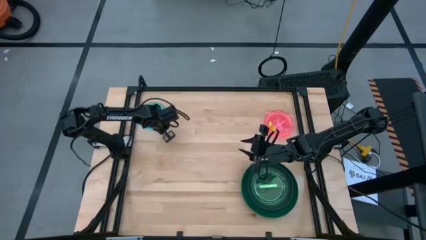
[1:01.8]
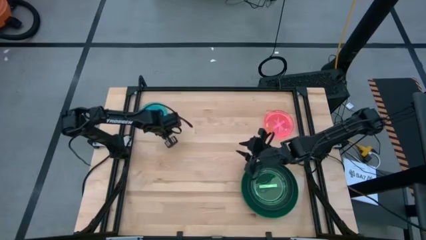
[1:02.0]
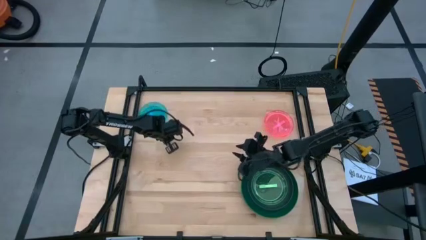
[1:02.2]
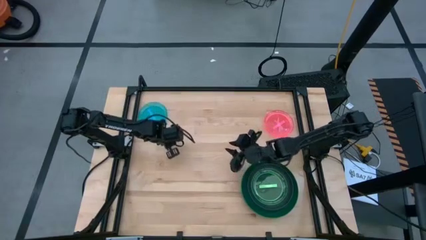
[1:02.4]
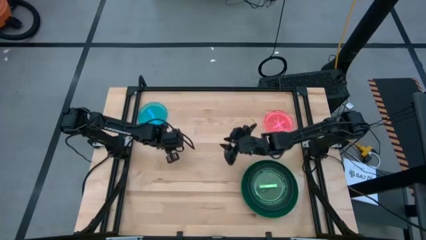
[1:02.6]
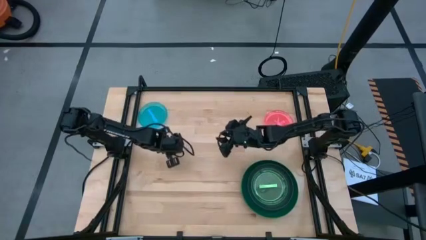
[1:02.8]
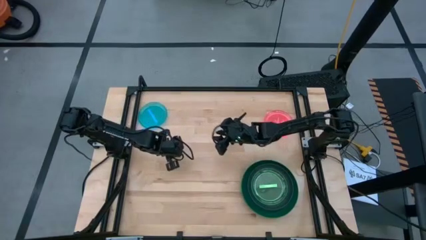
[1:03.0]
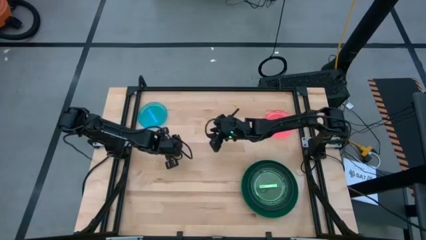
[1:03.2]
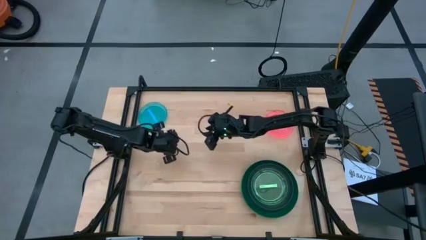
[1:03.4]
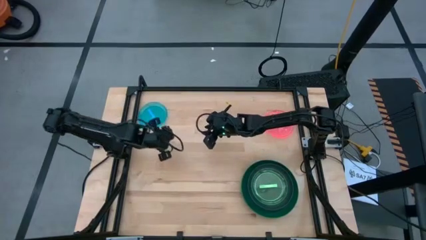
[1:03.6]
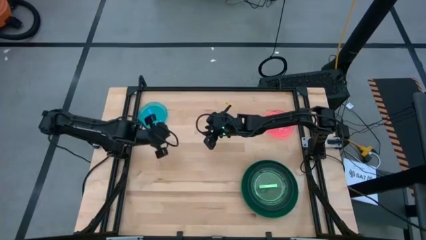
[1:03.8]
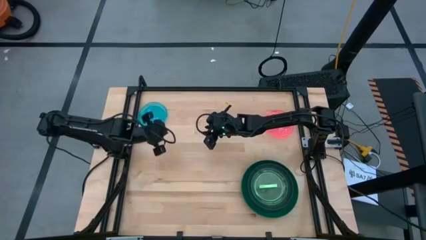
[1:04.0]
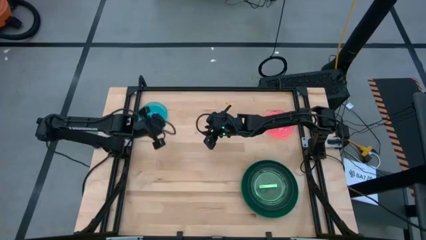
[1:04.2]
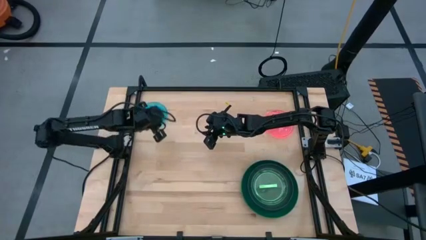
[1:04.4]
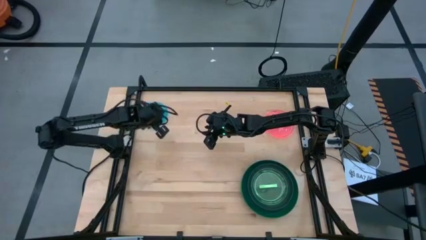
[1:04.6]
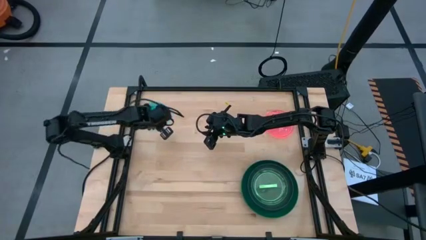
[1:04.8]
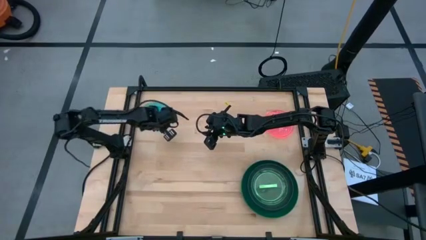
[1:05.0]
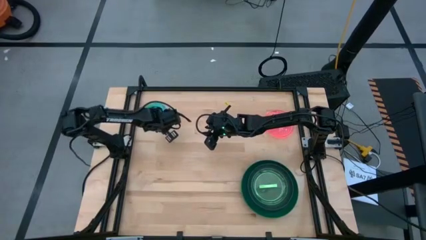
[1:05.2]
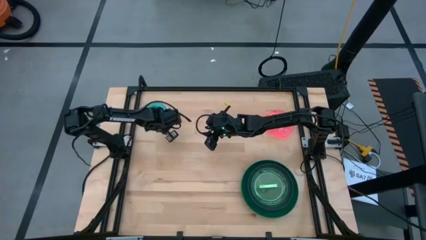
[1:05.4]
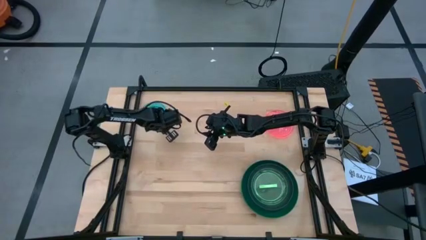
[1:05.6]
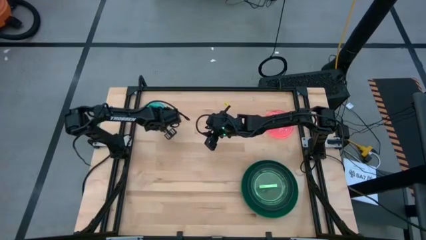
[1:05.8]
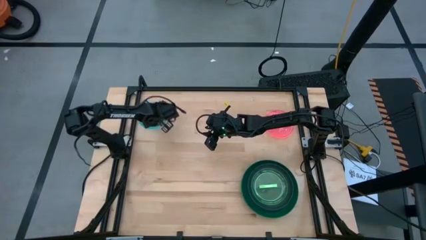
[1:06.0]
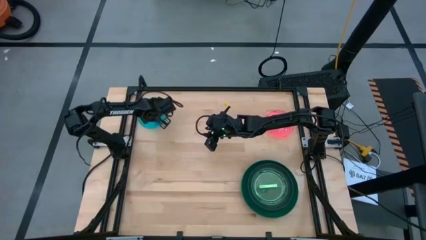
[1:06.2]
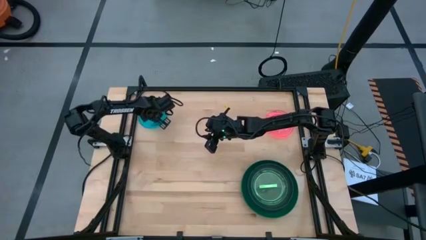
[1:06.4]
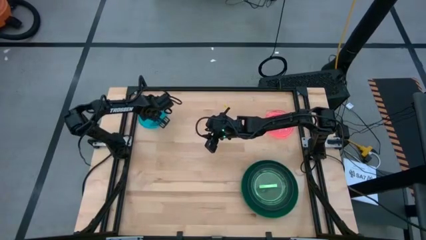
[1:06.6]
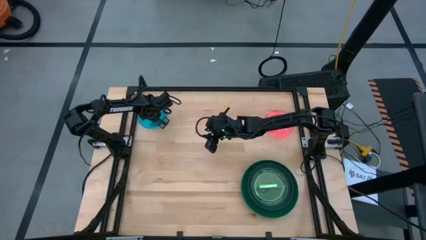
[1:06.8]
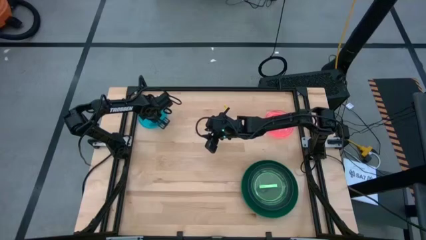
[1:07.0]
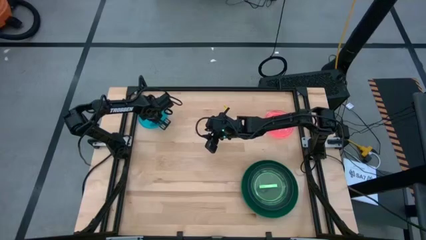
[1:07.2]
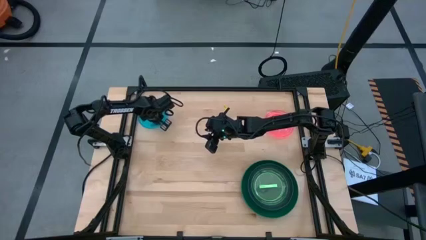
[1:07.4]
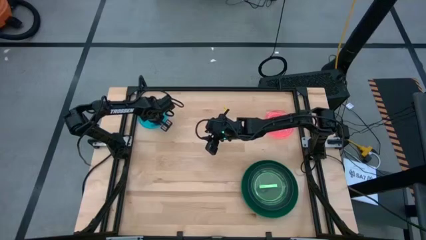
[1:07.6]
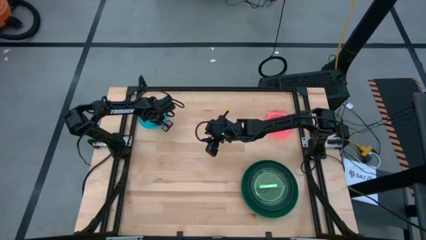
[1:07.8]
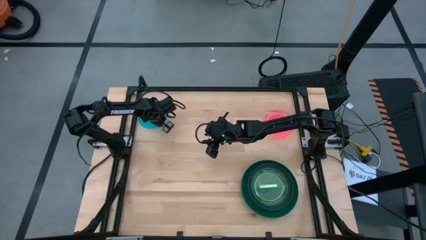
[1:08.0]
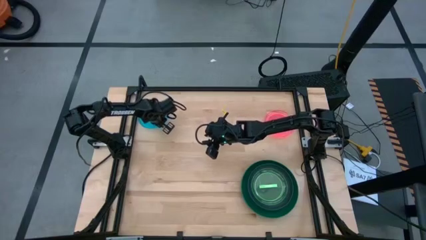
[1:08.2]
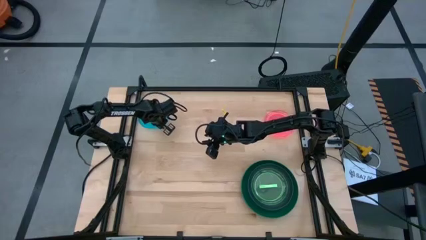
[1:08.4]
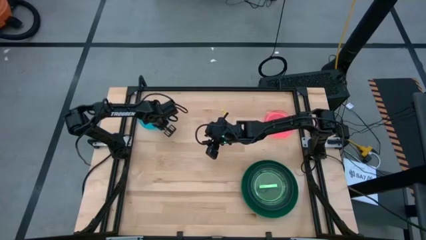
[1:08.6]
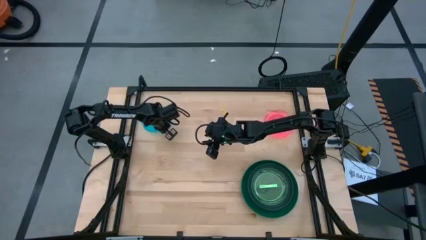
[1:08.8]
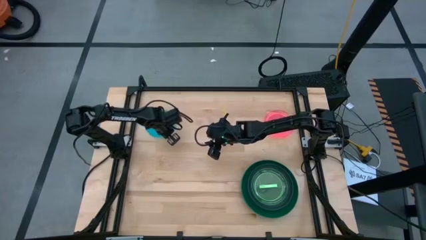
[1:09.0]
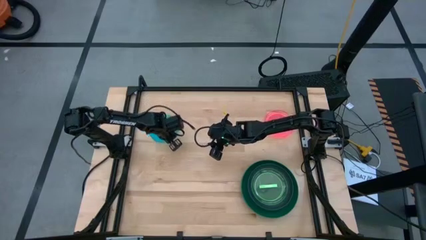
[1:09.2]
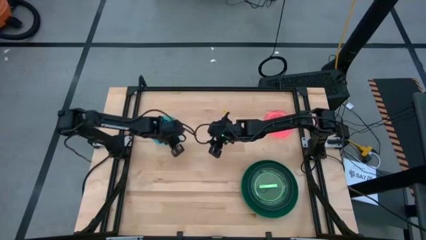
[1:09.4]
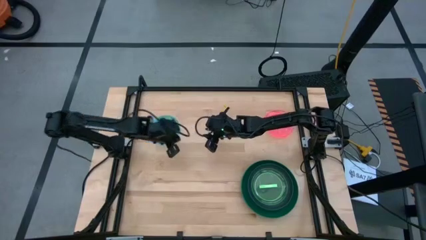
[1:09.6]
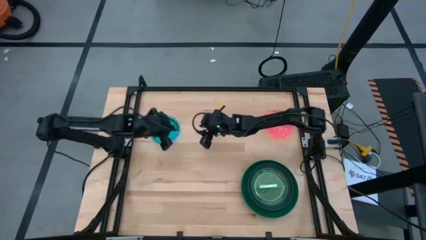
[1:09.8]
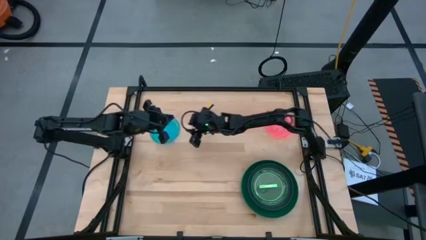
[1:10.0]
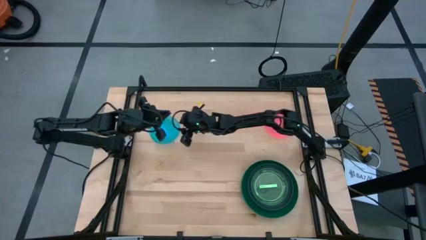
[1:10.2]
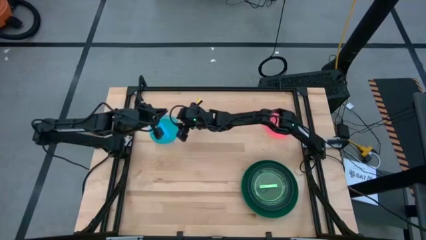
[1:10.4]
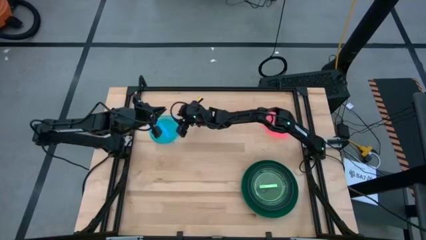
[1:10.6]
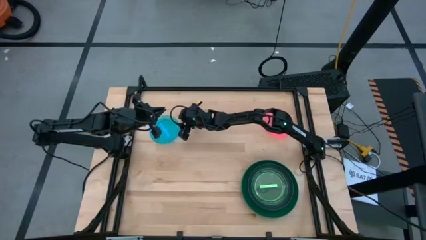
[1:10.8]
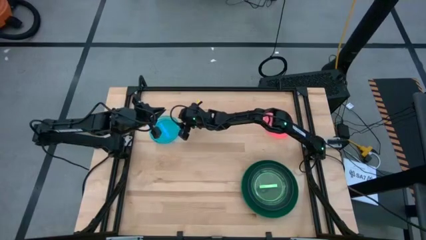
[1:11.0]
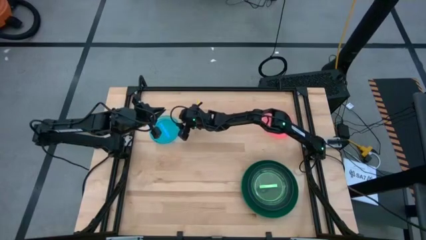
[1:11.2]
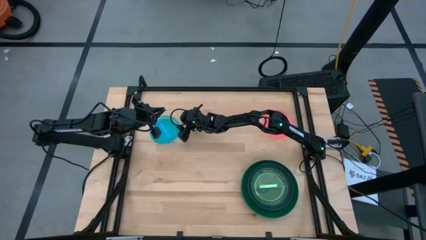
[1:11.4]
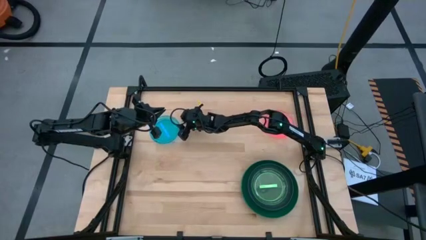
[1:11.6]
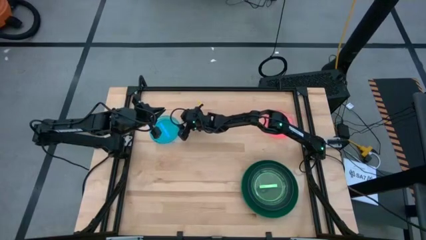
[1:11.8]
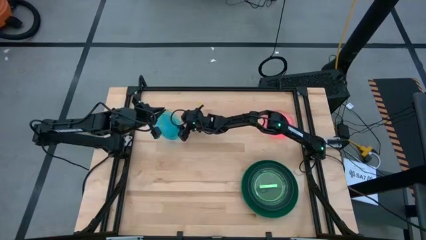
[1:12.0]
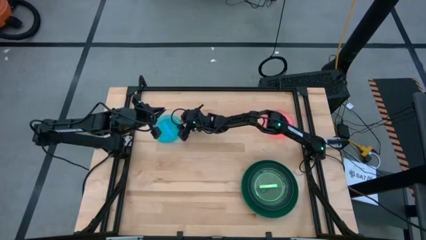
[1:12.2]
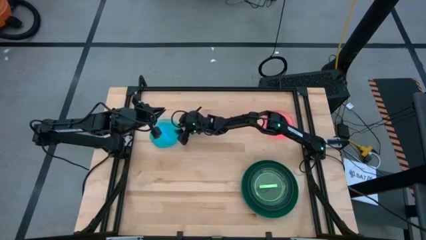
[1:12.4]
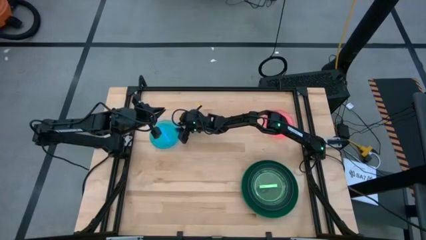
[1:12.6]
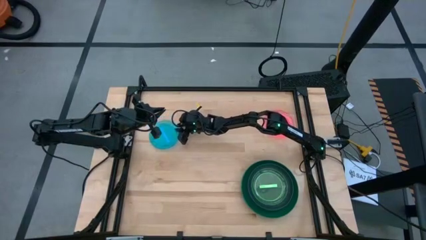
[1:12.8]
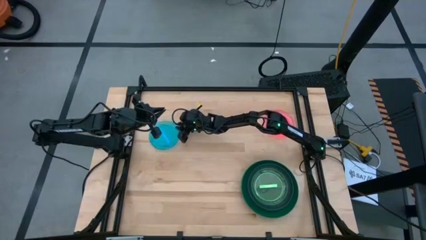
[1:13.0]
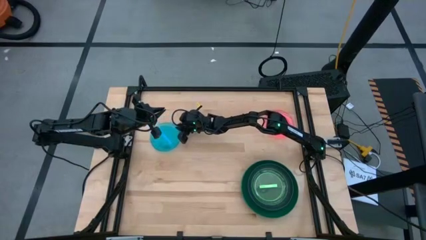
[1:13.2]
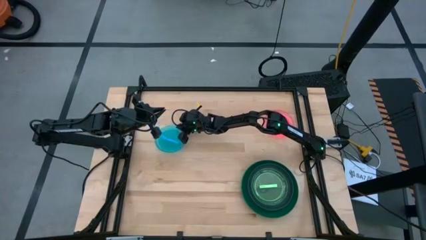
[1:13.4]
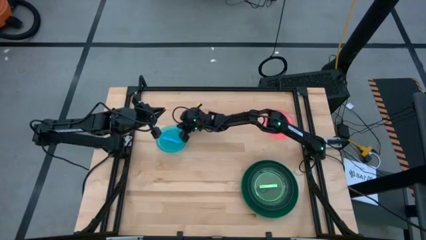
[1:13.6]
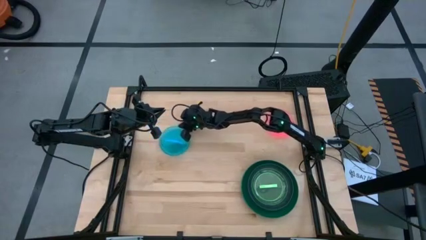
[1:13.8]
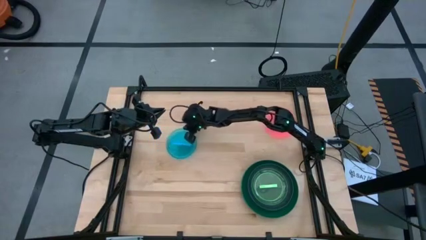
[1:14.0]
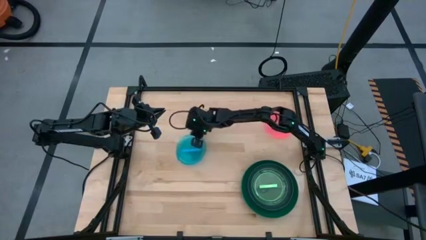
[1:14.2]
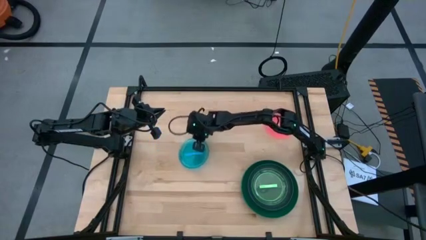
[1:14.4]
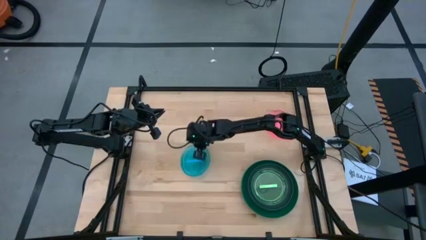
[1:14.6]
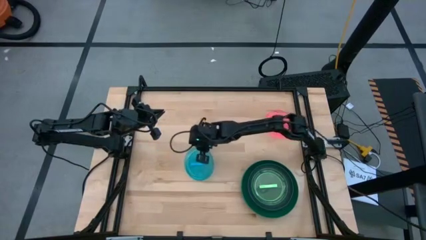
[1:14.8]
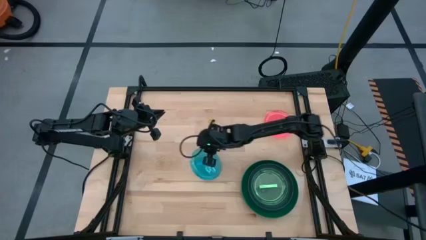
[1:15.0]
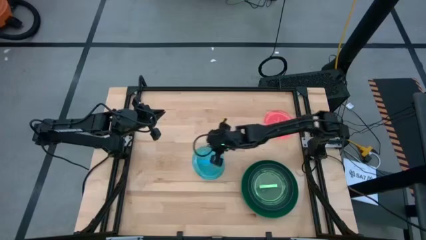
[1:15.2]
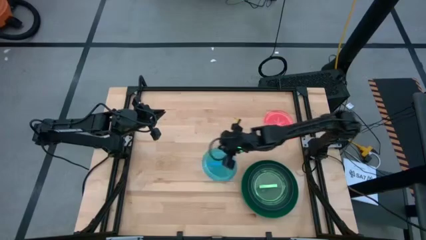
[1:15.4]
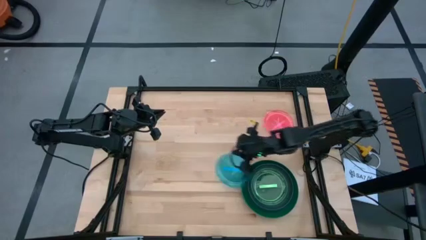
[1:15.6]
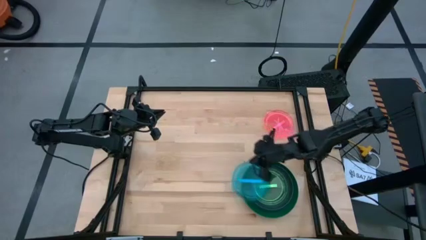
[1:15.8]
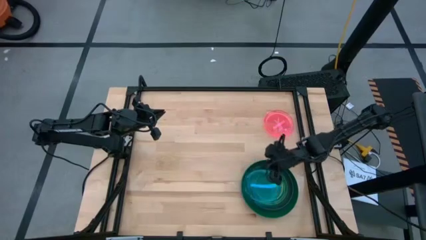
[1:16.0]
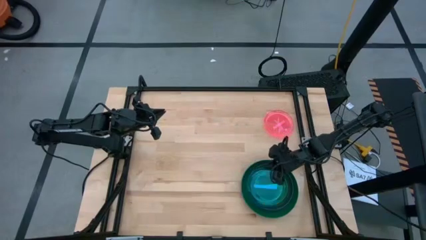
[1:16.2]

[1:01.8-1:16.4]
Task: Stack plastic plates
Stack the blue plate on top of the light green plate

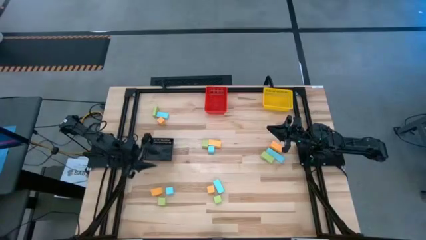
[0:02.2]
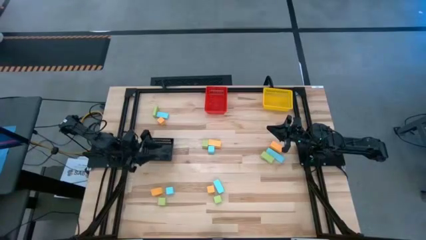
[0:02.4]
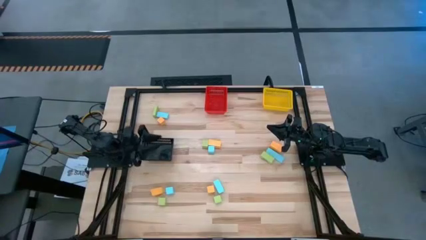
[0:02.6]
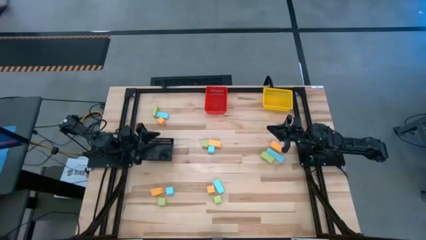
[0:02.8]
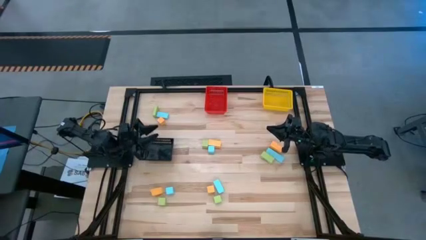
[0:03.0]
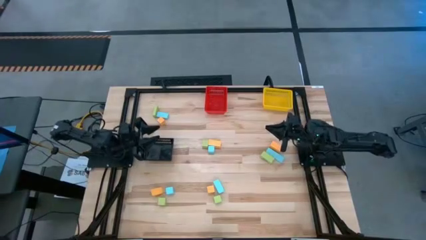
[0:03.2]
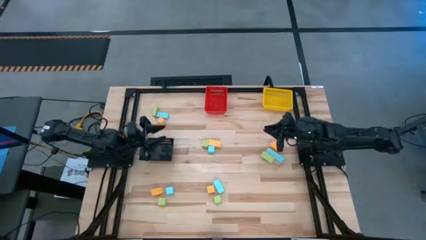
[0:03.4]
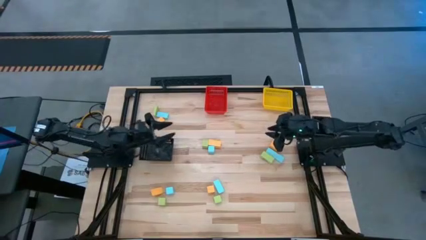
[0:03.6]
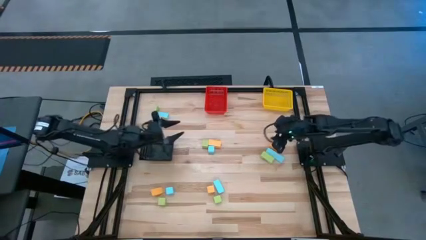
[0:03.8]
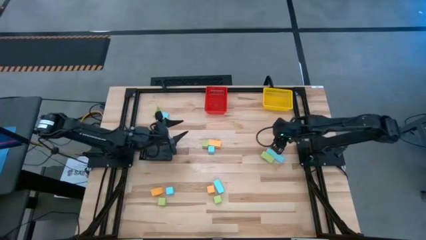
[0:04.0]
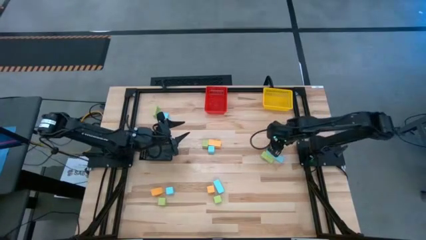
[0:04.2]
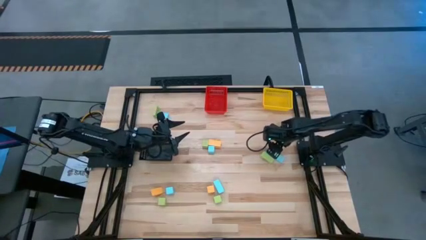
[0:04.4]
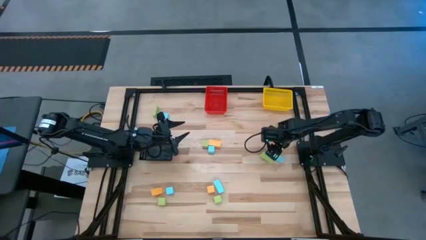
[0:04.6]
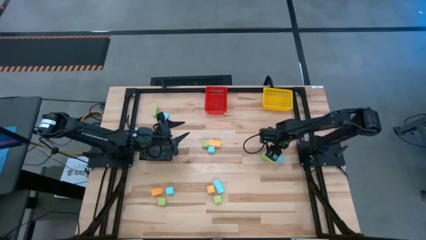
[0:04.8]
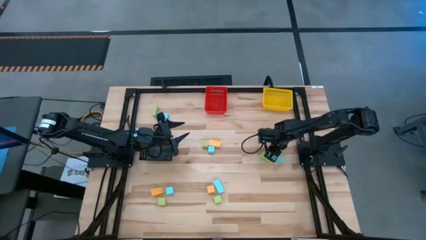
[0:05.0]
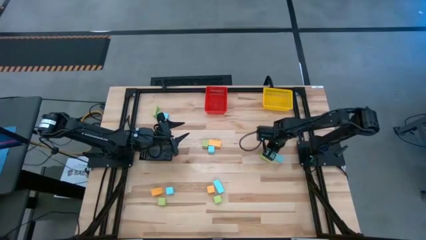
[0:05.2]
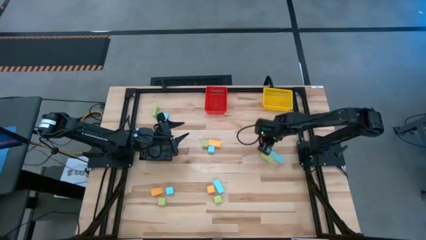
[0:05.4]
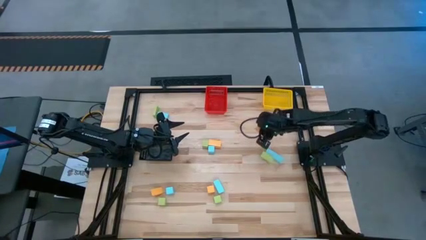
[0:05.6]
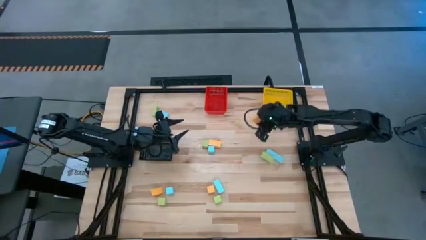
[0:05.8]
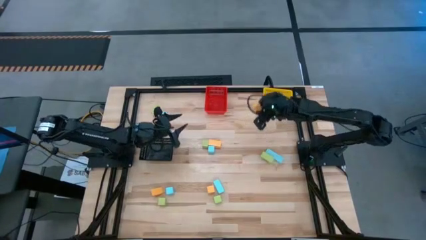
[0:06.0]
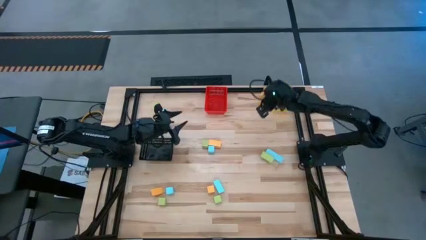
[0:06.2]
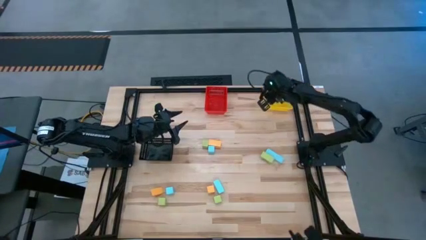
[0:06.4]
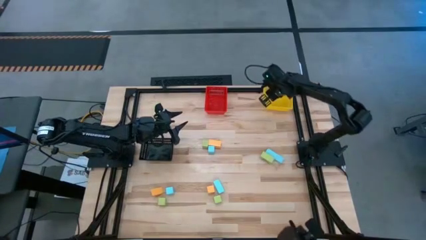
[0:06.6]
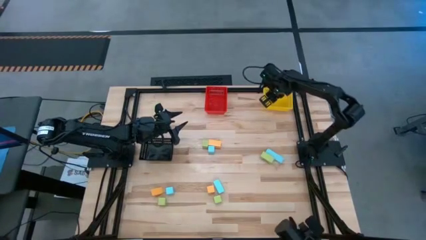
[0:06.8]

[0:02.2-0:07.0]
Task: Sort & place blocks by color
Put the yellow block into the yellow bin
